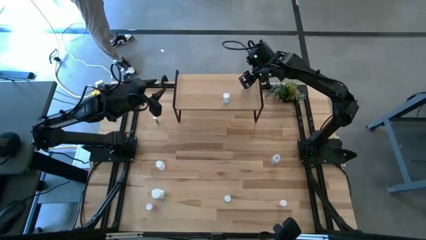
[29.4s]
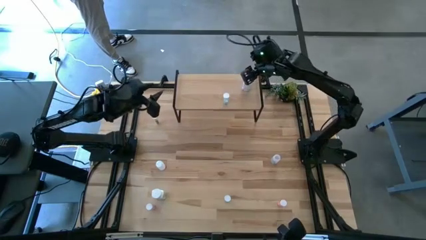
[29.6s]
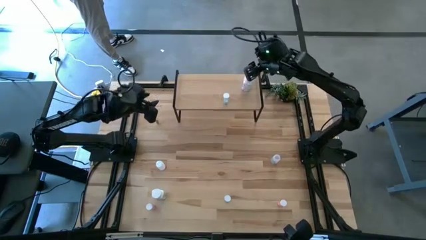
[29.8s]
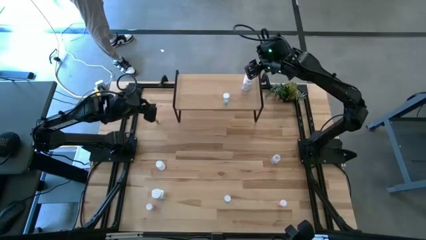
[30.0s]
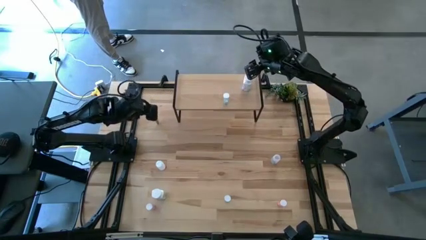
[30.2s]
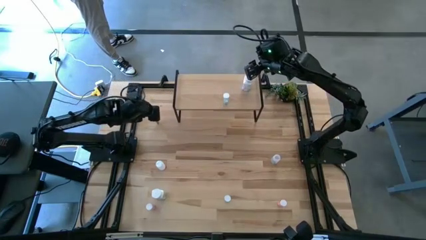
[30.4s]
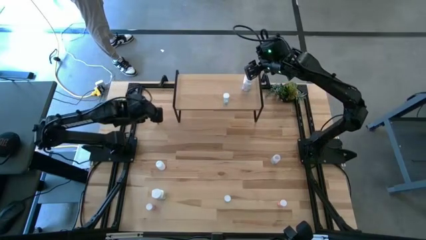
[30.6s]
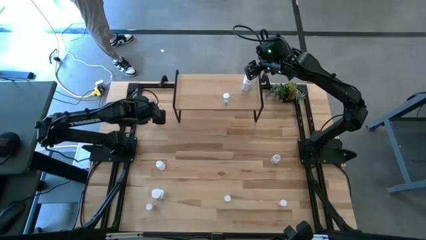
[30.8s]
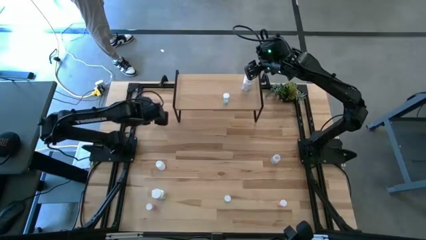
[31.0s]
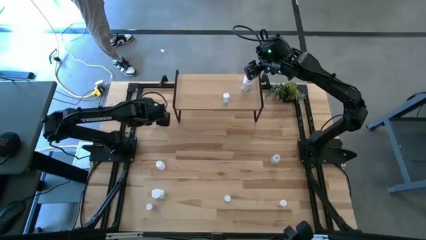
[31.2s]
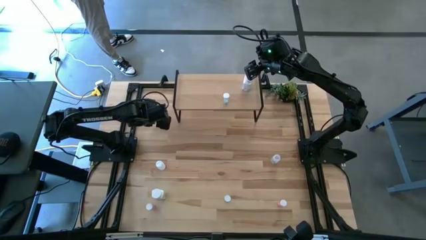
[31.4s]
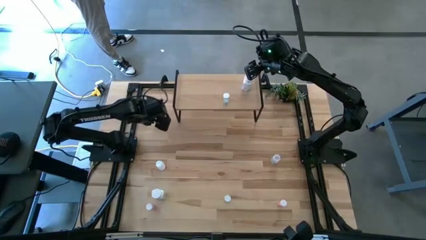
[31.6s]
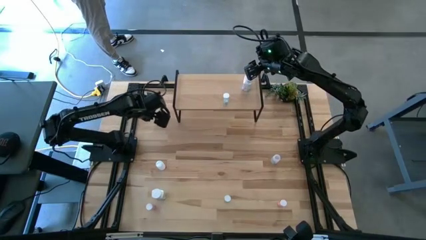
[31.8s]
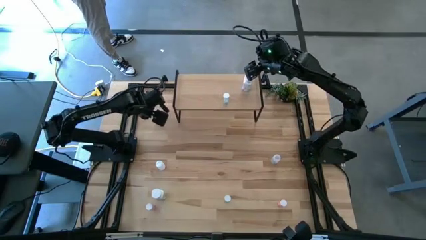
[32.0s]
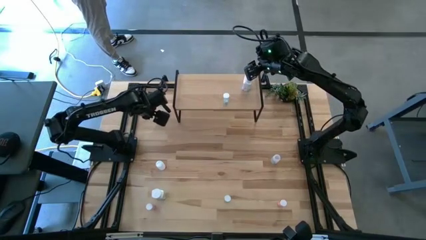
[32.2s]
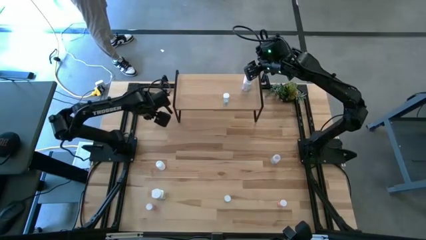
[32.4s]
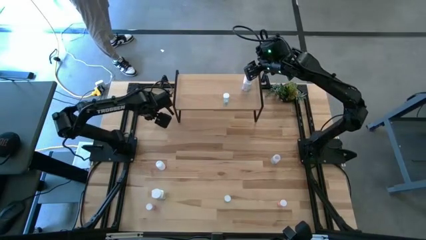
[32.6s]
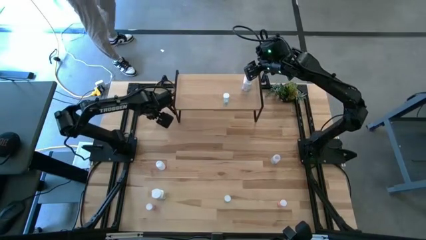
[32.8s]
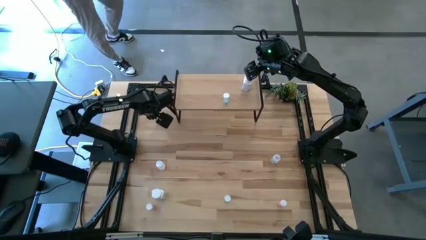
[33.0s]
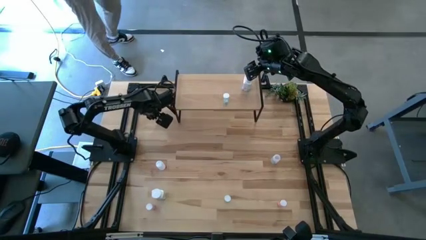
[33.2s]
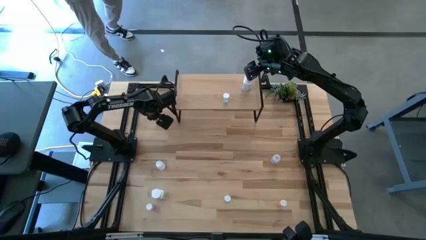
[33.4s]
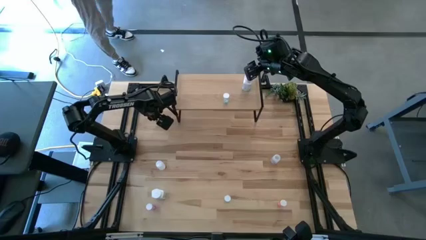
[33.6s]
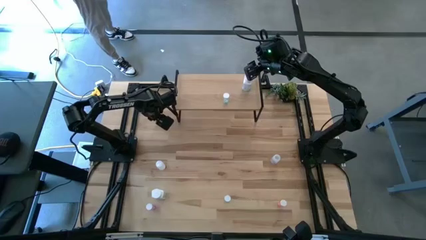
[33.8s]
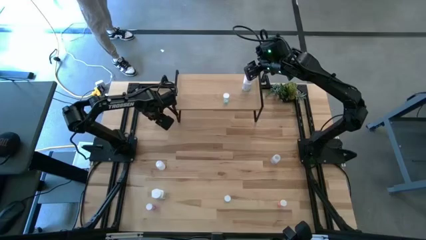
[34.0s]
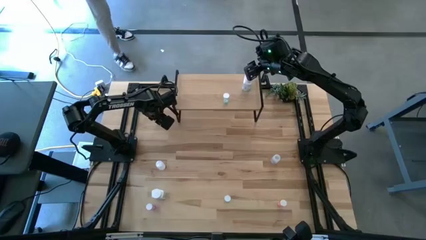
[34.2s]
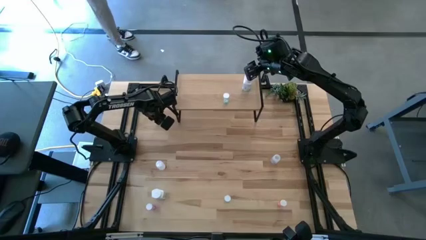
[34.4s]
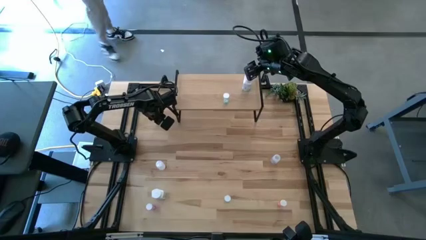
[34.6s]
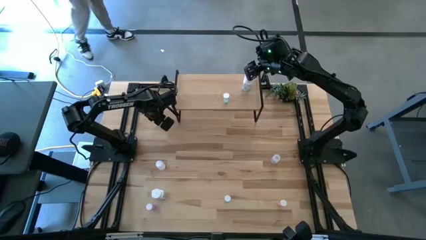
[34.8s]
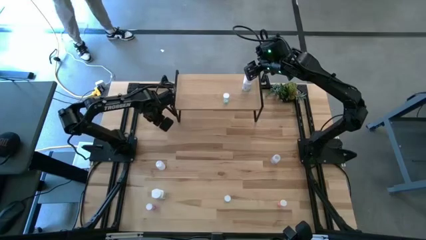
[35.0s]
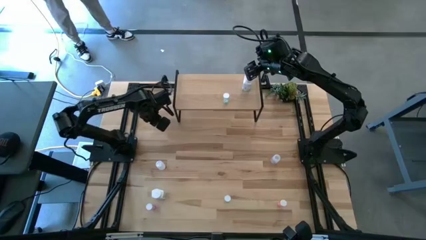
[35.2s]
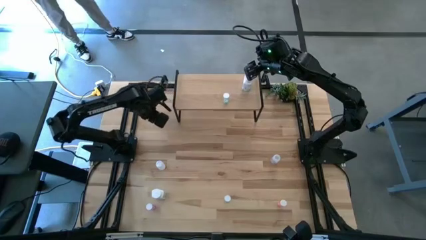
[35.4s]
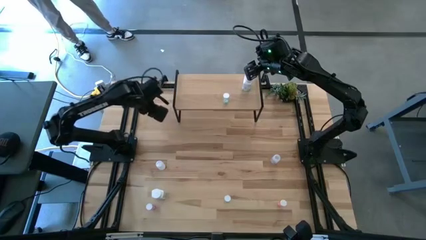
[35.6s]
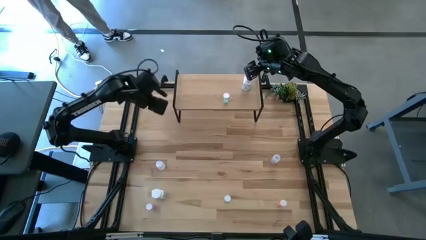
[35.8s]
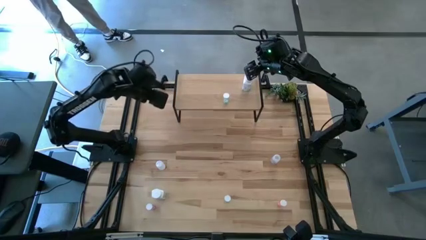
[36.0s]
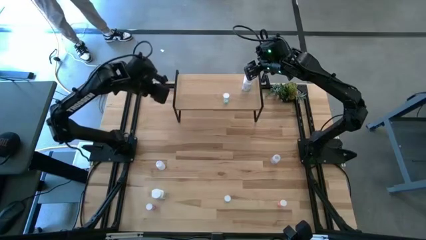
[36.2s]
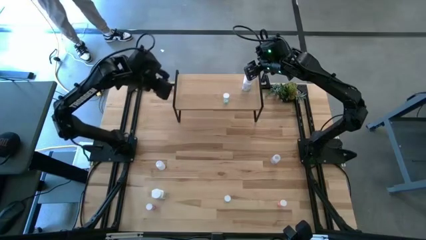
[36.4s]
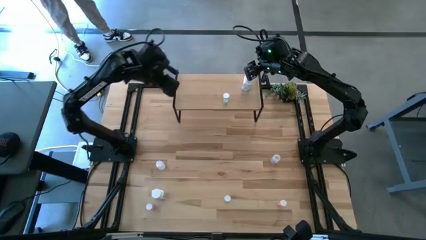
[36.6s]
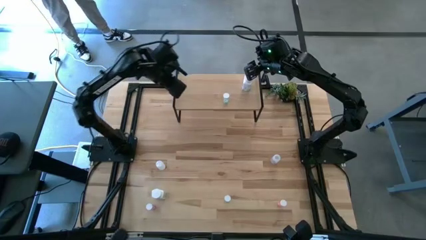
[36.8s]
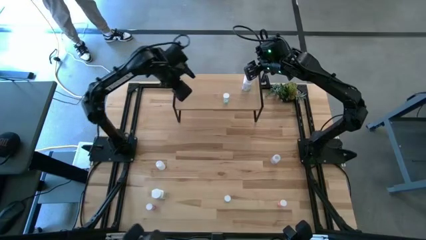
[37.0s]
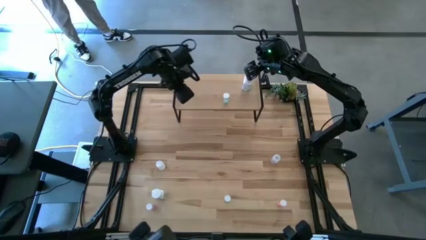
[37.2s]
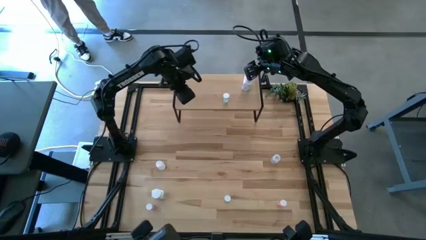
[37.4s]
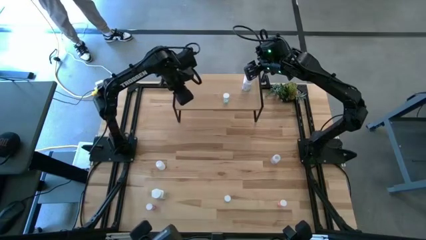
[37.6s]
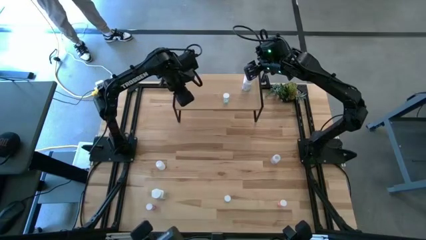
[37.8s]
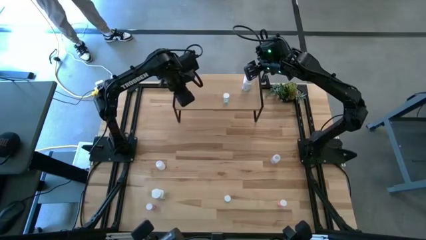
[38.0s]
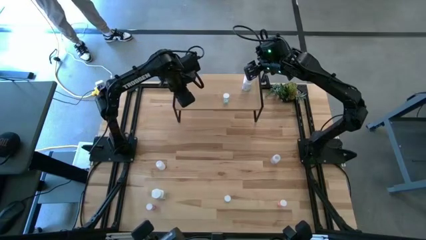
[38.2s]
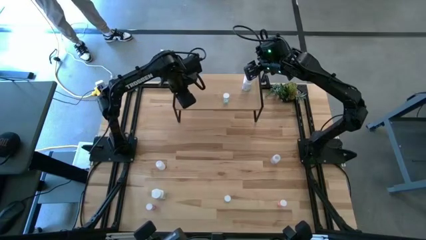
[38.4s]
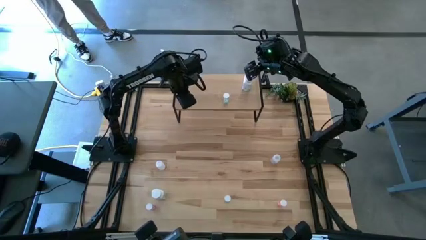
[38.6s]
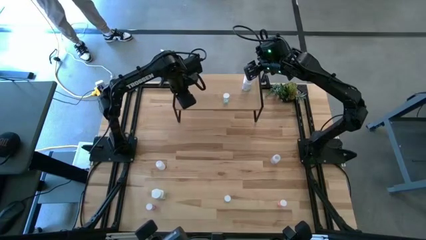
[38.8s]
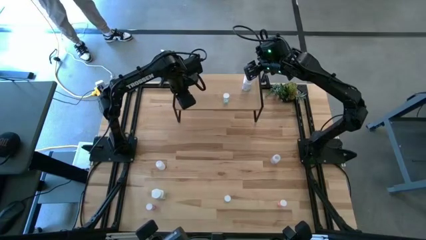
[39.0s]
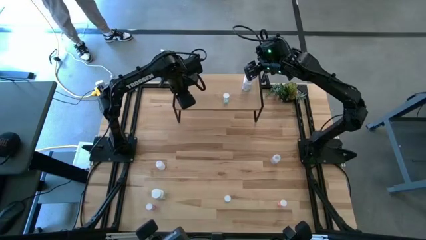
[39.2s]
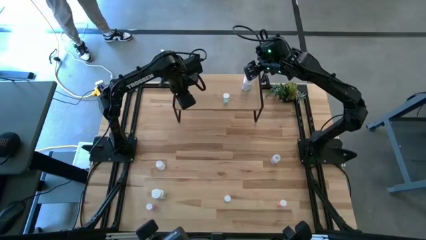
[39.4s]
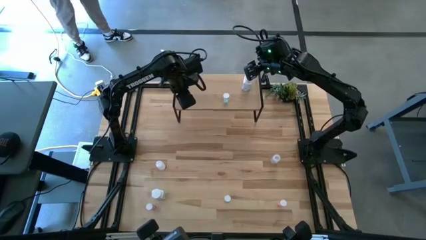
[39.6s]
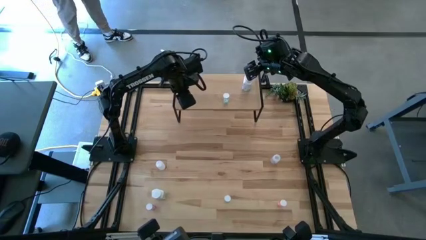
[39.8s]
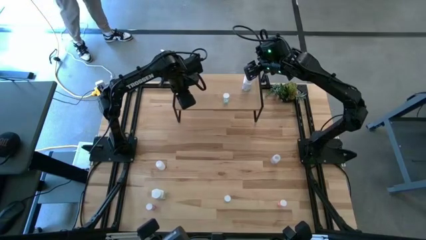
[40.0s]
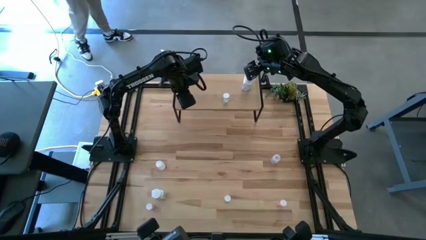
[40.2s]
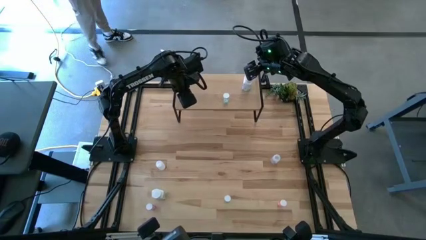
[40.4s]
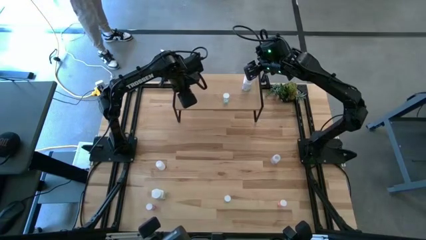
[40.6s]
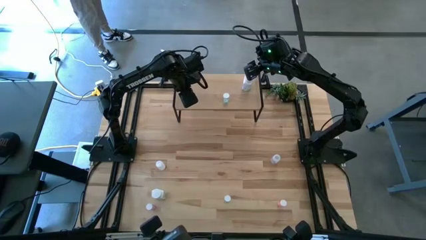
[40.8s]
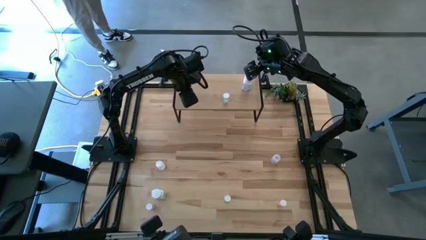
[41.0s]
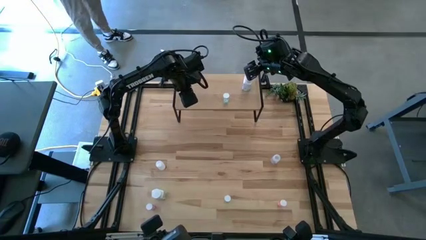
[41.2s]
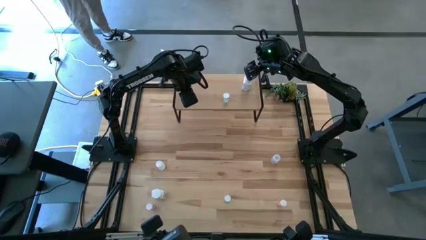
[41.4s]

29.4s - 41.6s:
Task: Pick and place medicine bottles onto shelf by color
Put the yellow pill bottle on the shelf
